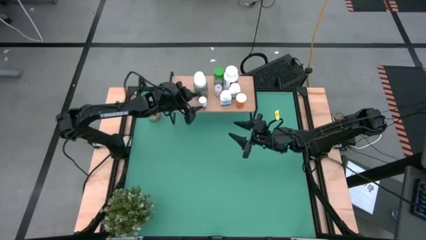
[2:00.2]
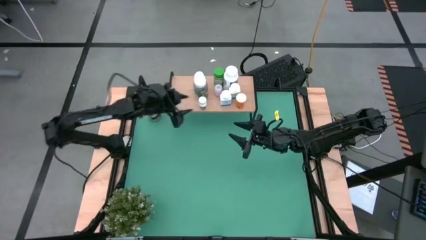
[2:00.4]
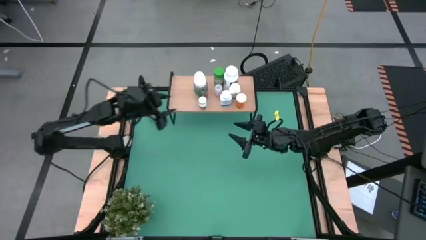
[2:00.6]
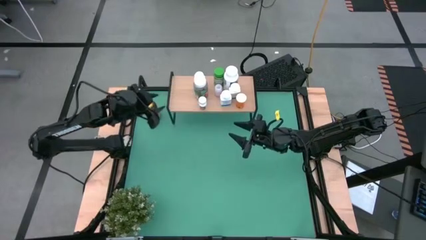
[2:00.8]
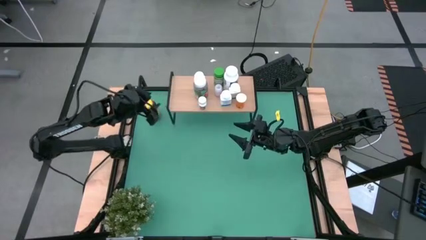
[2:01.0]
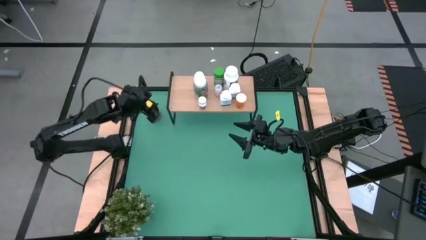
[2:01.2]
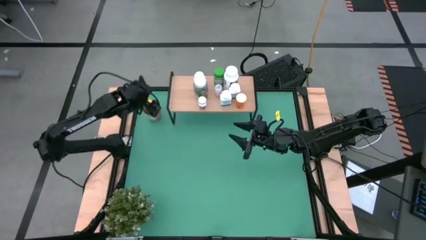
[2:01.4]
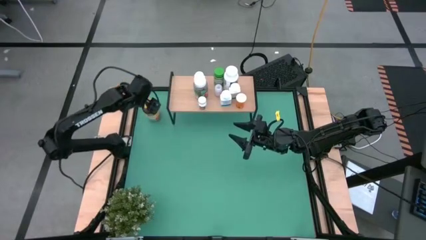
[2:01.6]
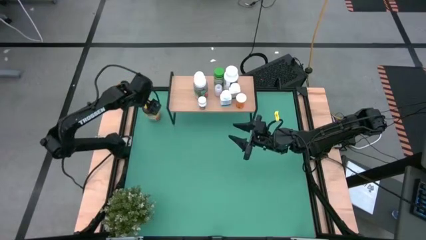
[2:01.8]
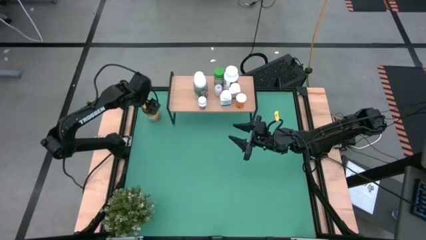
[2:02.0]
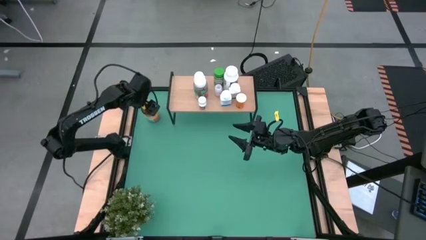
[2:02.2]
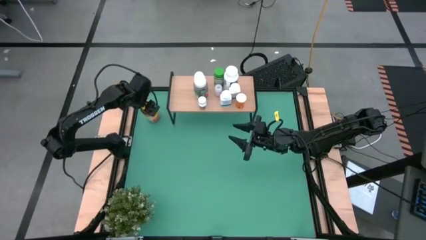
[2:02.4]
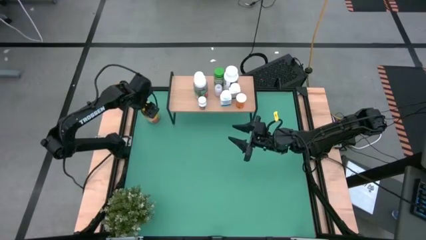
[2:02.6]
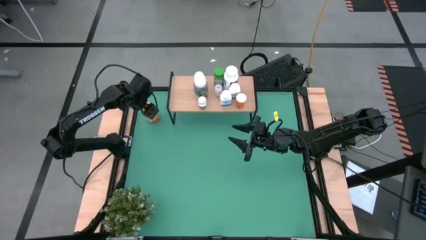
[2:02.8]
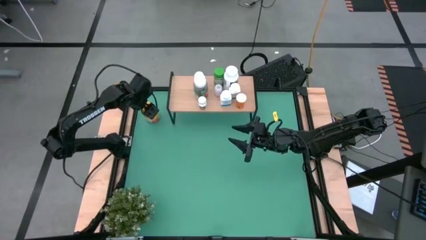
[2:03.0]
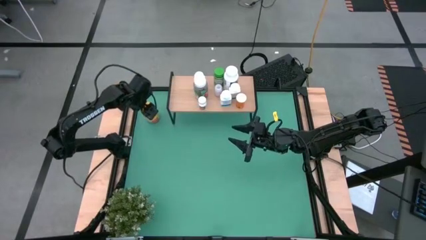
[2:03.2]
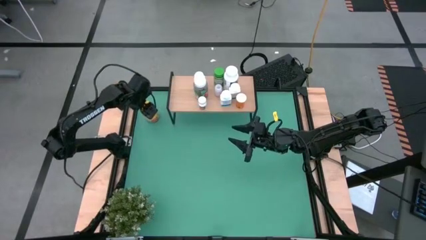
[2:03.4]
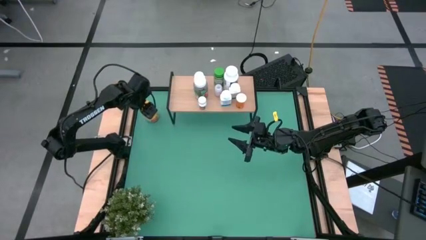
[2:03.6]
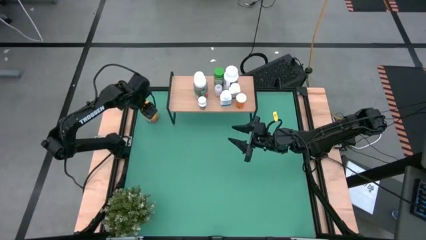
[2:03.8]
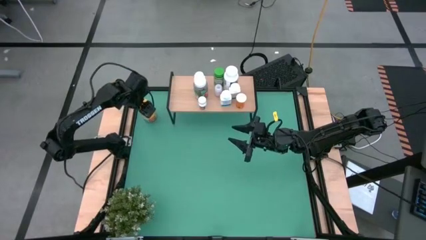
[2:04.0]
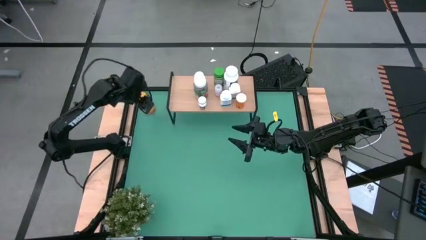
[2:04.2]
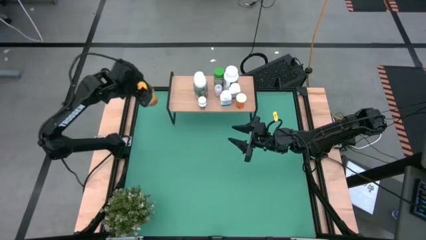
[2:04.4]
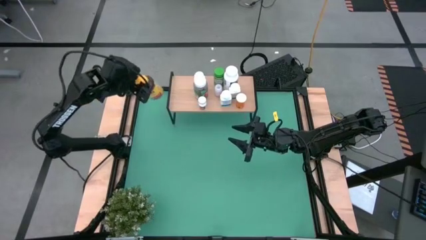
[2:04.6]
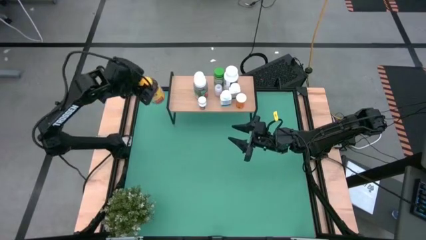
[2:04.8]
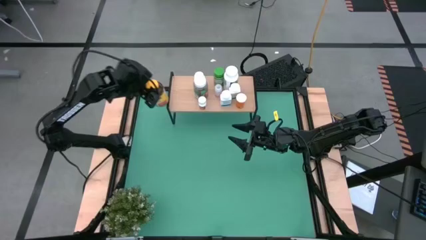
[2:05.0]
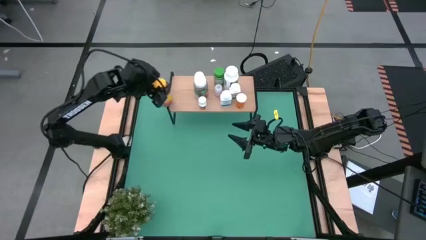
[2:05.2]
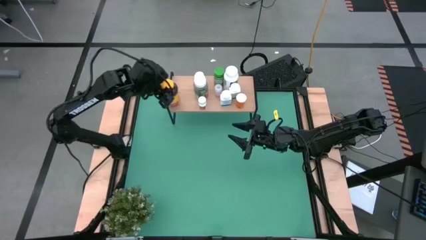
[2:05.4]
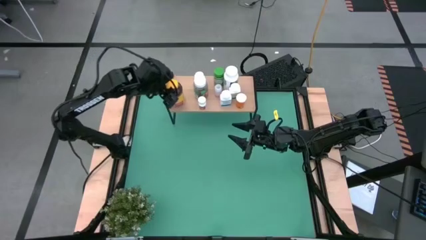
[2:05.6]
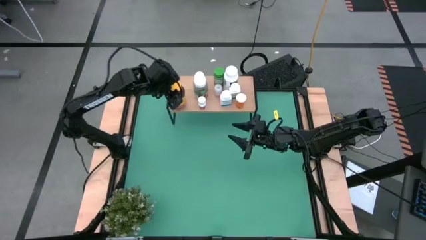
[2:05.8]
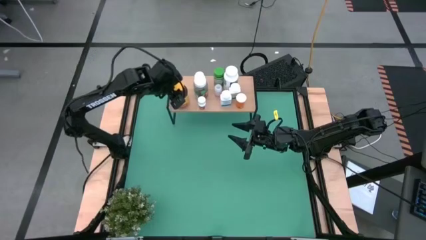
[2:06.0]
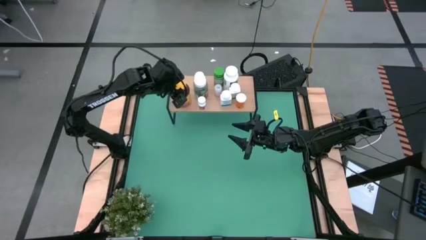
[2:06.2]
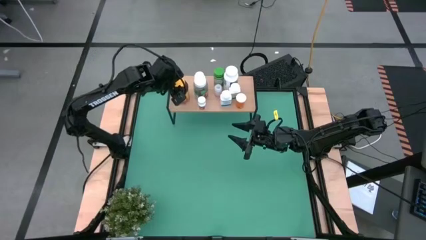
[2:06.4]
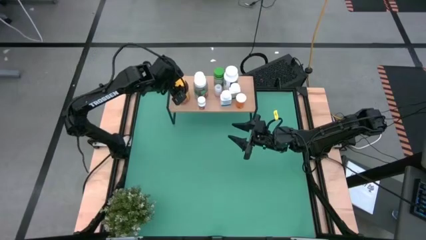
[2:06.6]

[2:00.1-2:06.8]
Task: Pick and place medicine bottles onto shelf by color
Put the yellow medicine bottle on the shelf

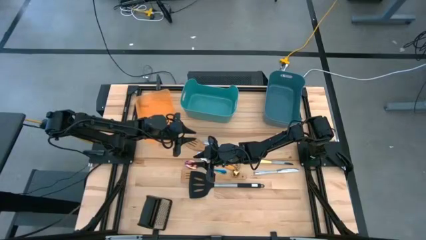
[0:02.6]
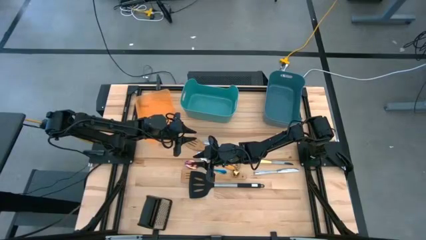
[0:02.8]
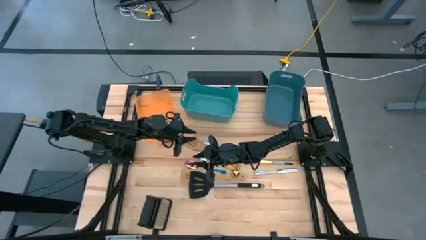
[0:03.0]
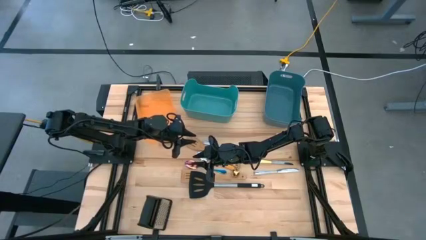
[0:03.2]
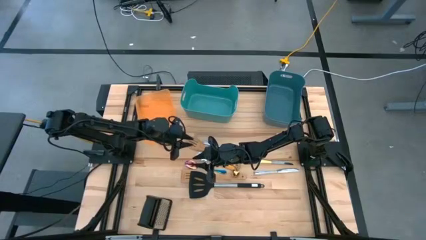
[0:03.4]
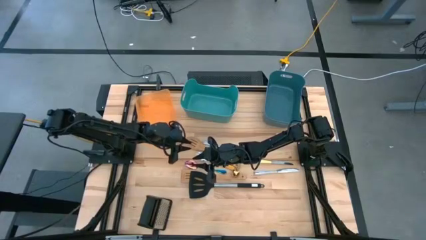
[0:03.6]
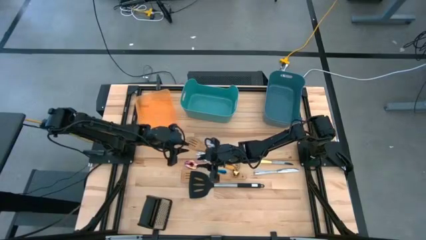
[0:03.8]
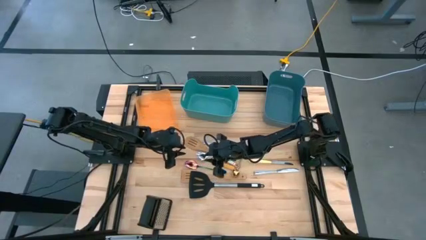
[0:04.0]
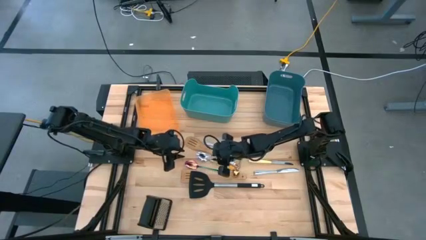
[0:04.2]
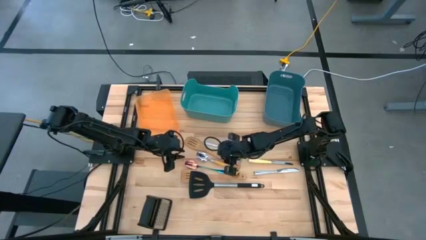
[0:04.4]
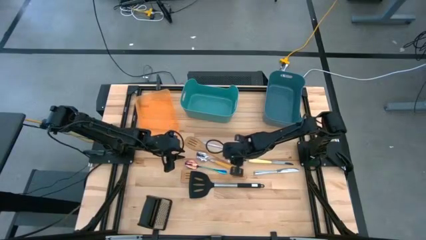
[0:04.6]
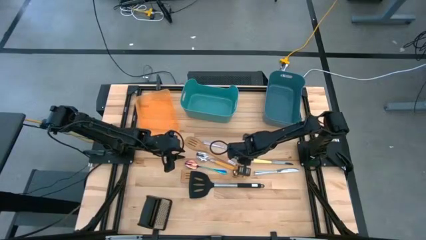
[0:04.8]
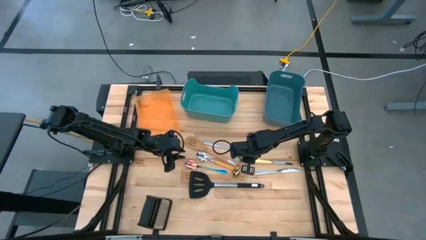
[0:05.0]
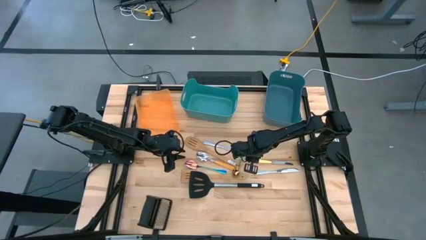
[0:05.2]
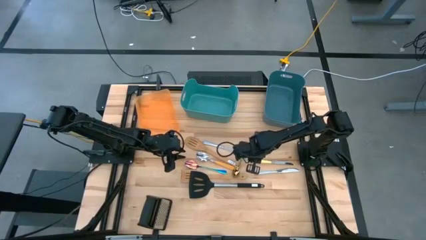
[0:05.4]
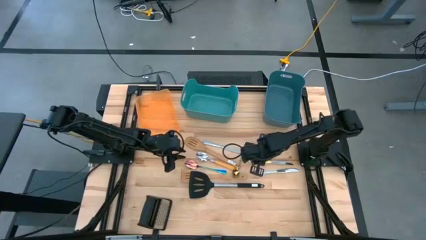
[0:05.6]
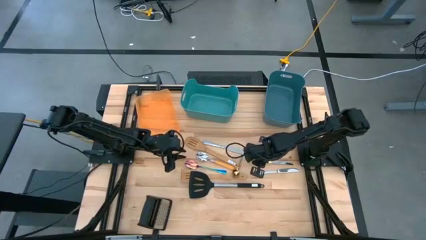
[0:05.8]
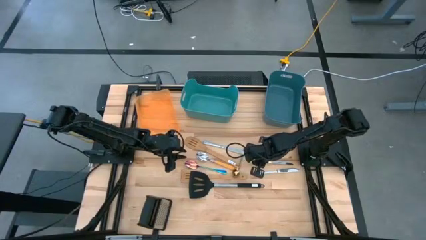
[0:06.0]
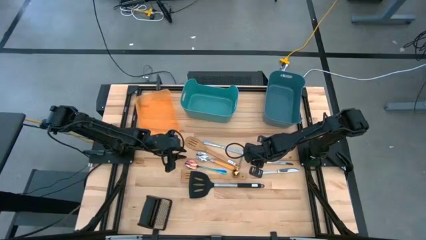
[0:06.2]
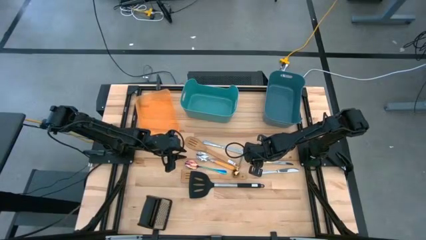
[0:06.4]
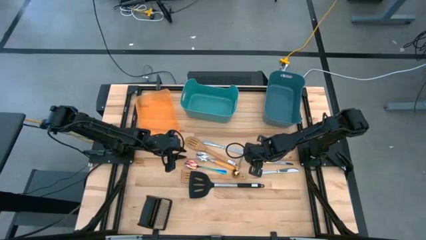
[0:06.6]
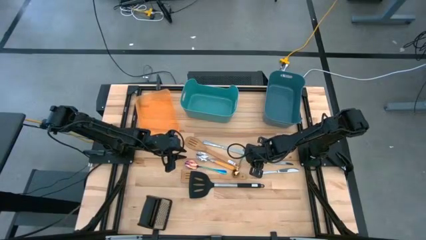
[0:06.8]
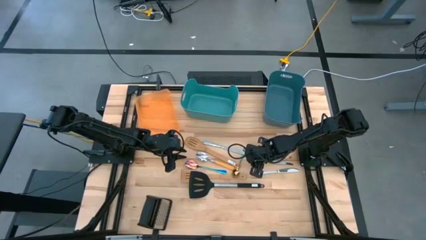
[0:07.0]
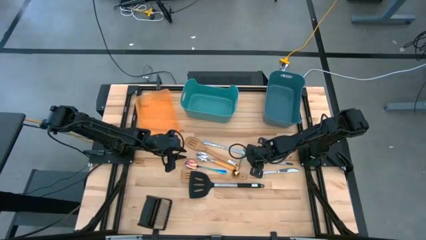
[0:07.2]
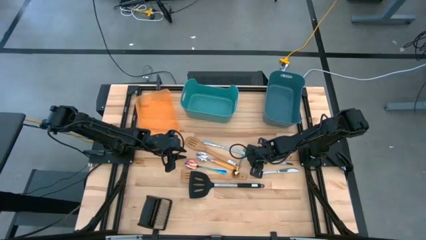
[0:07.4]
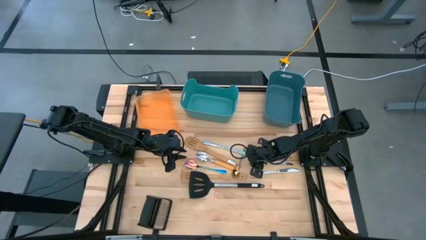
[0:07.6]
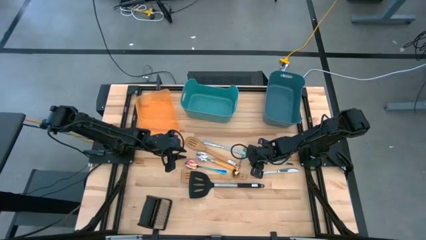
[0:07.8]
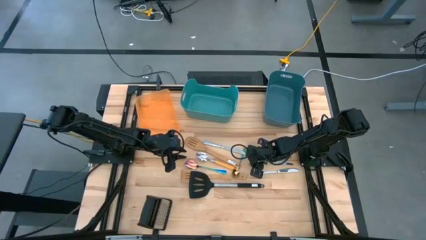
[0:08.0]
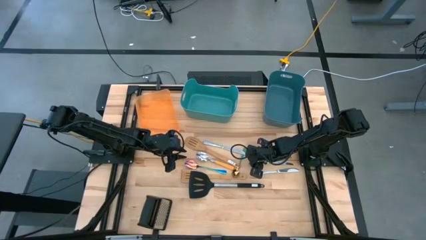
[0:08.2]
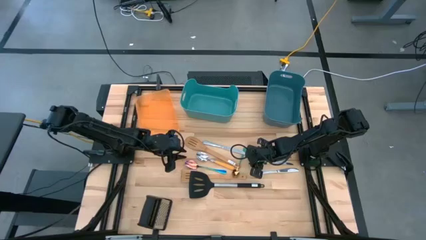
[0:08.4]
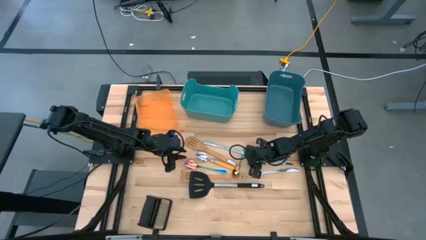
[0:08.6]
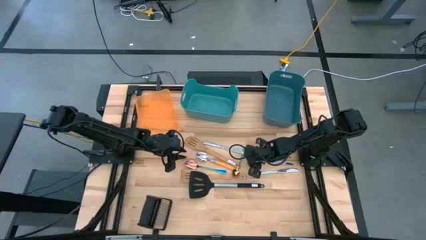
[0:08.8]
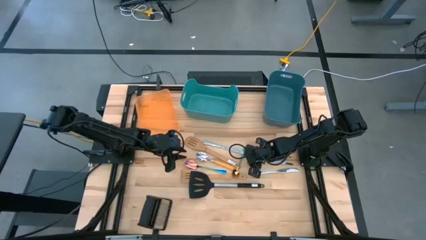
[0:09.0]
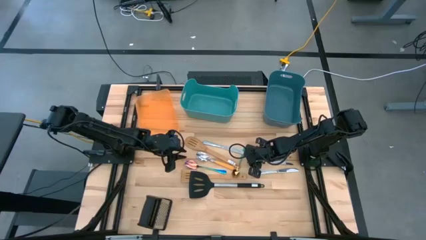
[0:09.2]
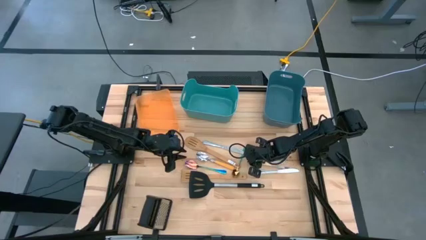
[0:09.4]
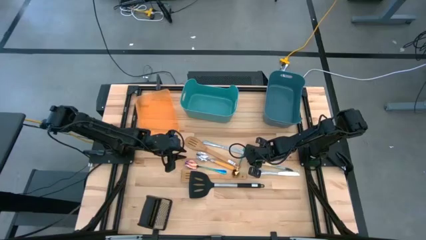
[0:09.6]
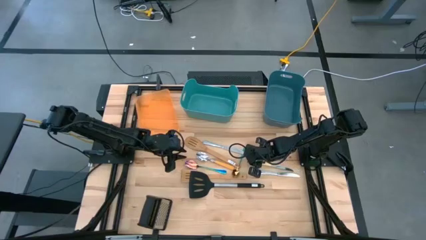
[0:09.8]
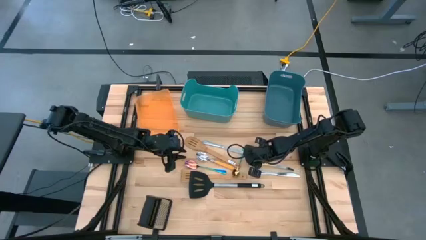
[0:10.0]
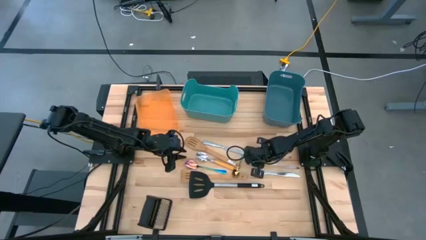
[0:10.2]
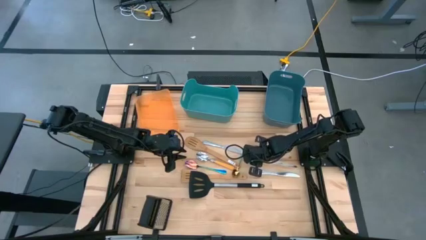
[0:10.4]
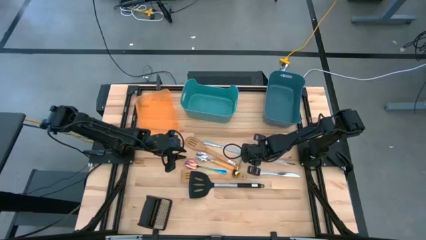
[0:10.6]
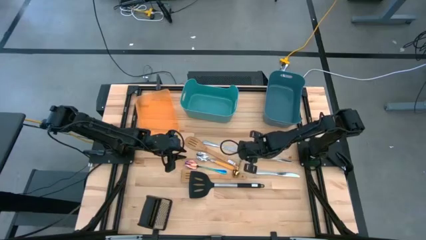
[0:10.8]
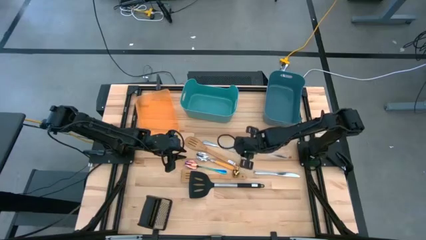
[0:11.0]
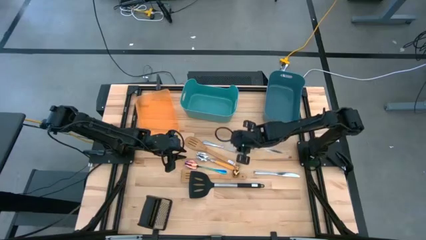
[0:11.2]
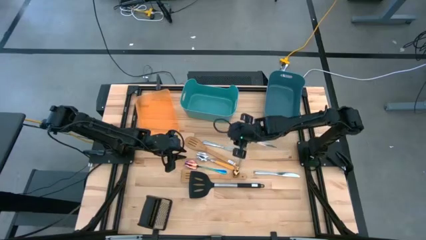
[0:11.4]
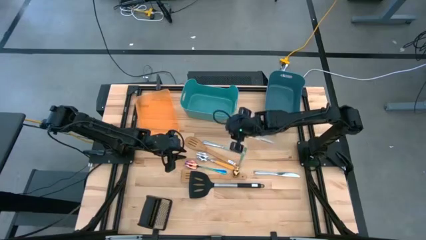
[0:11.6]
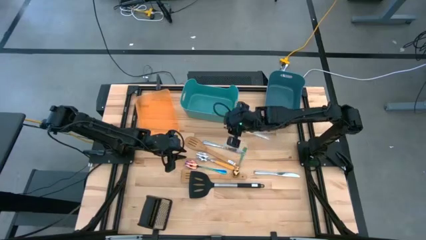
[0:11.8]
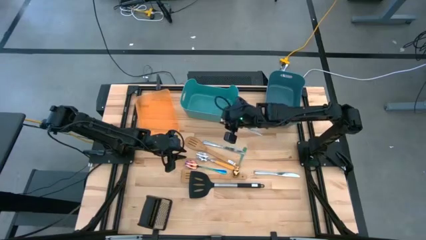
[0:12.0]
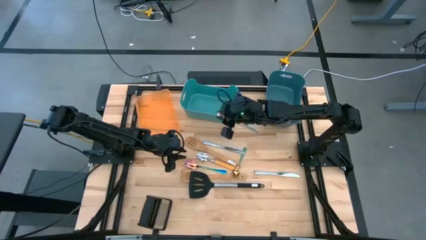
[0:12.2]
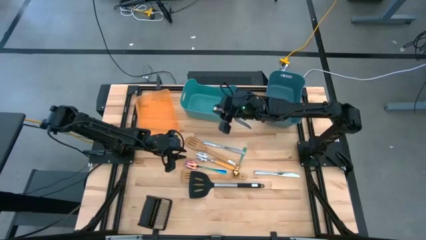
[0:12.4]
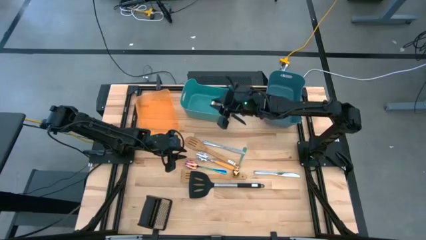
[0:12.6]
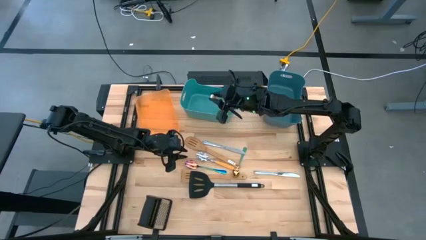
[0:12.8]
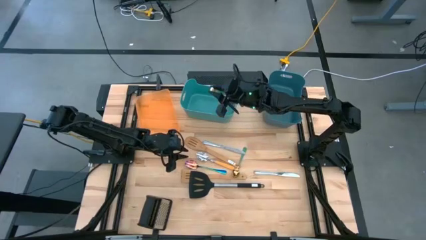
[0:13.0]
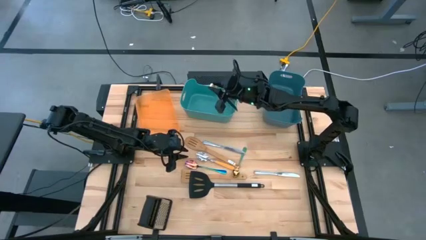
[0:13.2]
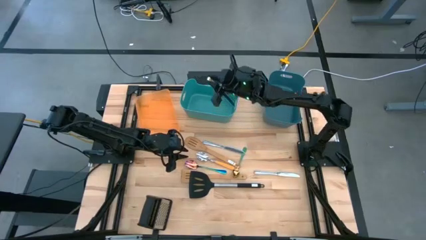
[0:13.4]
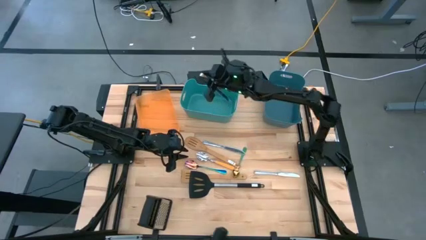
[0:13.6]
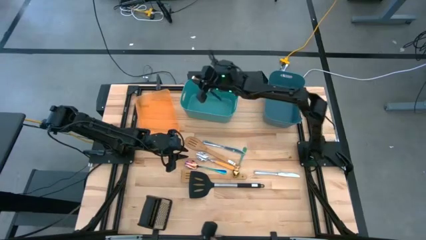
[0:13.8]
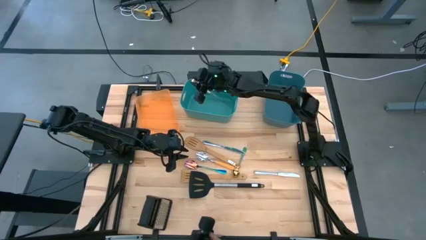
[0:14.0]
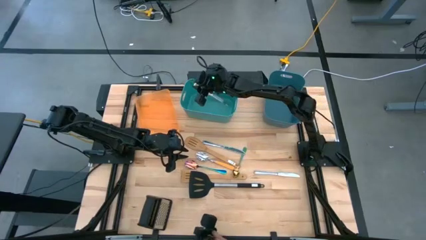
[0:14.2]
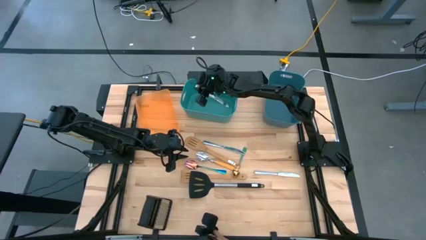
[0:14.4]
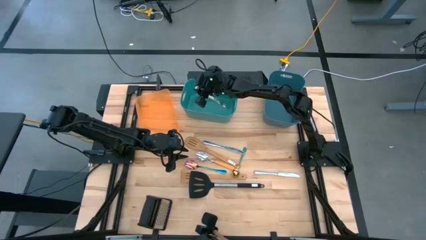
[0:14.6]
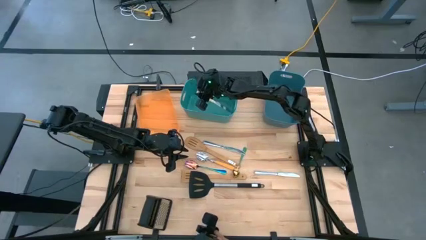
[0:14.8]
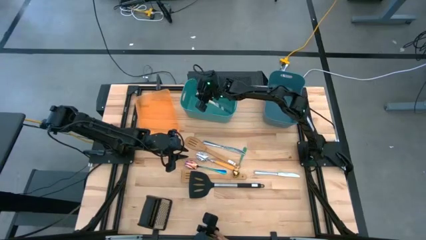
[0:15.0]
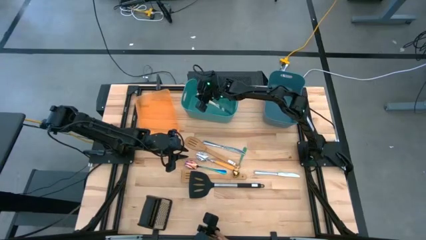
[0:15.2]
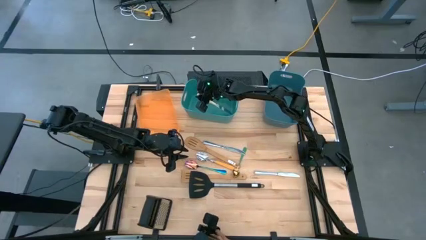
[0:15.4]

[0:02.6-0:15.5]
Task: Pick & Place Kitchen Items
Put the yellow knife into the green bin
